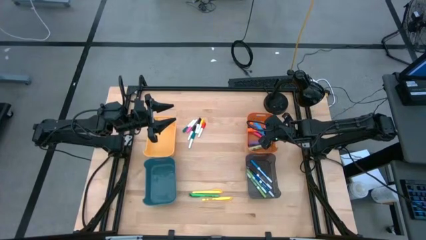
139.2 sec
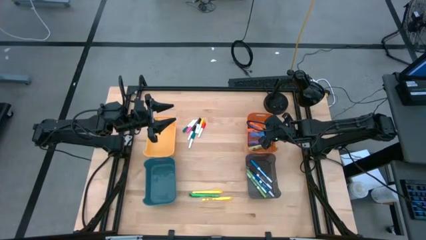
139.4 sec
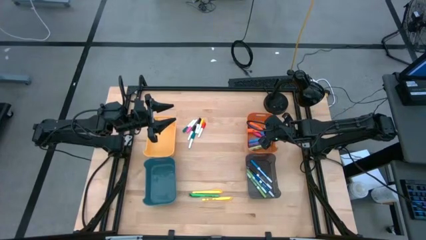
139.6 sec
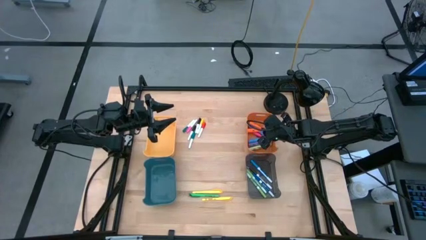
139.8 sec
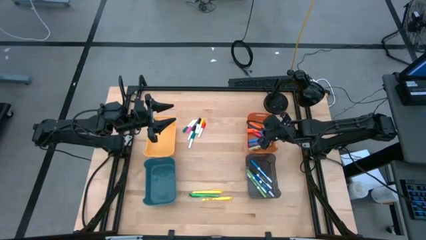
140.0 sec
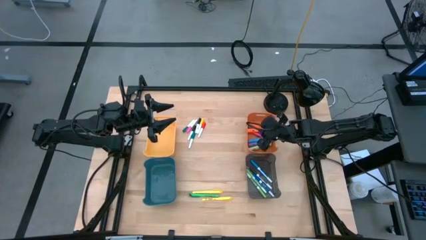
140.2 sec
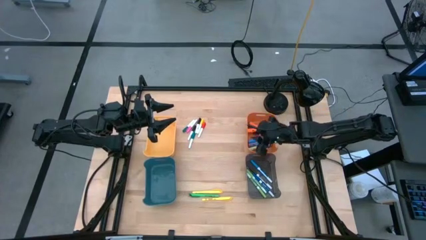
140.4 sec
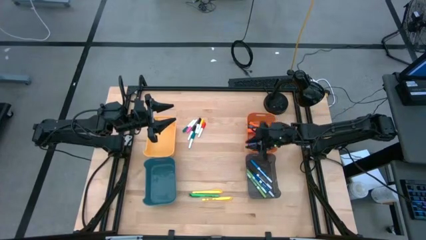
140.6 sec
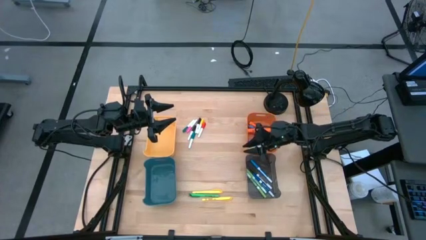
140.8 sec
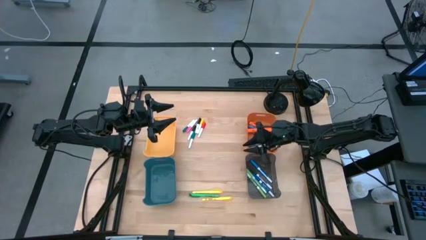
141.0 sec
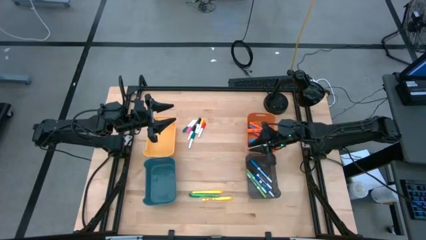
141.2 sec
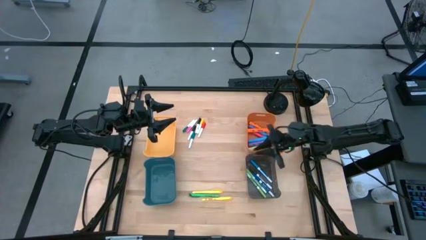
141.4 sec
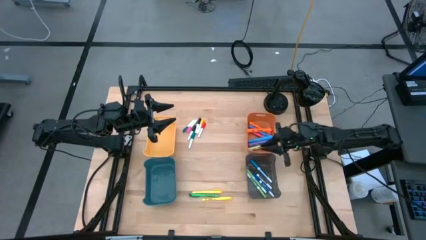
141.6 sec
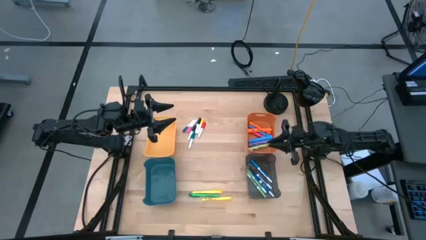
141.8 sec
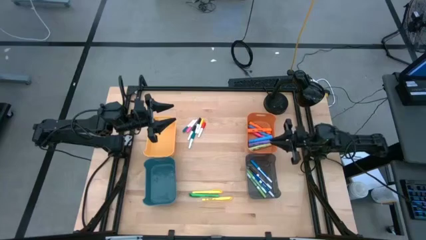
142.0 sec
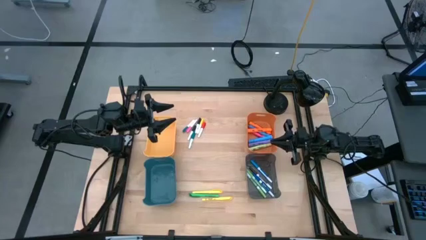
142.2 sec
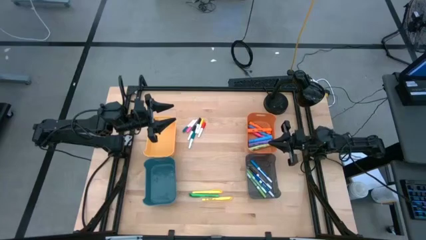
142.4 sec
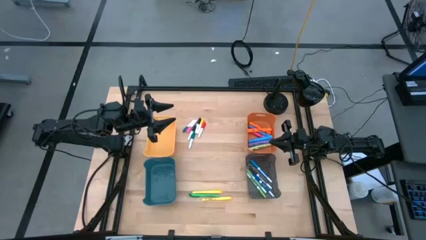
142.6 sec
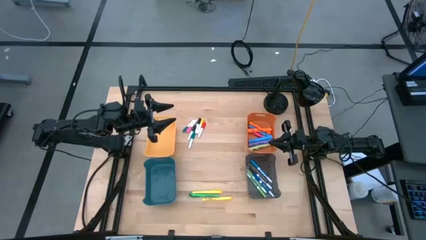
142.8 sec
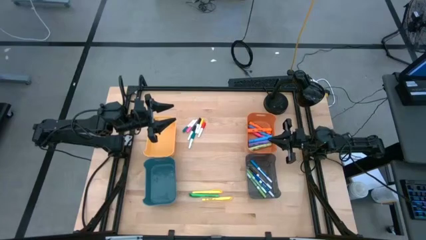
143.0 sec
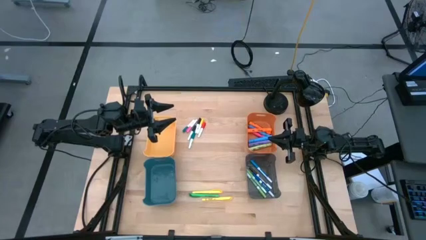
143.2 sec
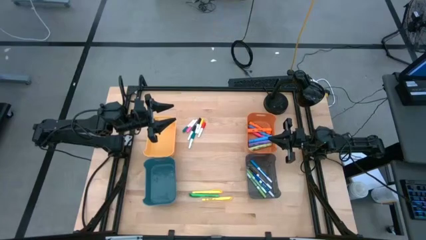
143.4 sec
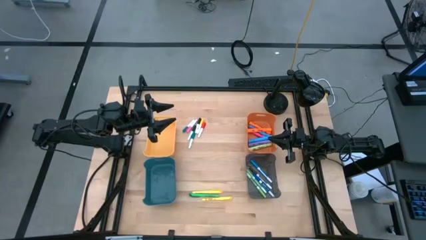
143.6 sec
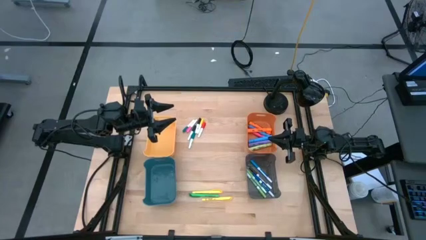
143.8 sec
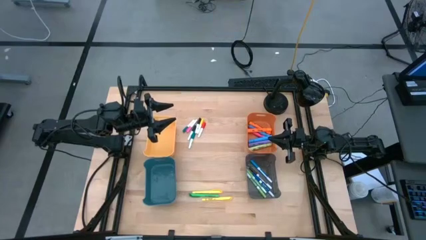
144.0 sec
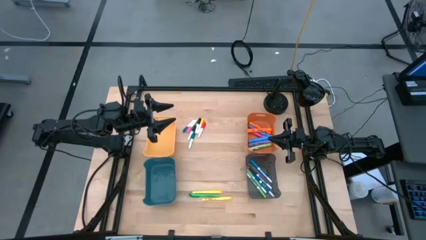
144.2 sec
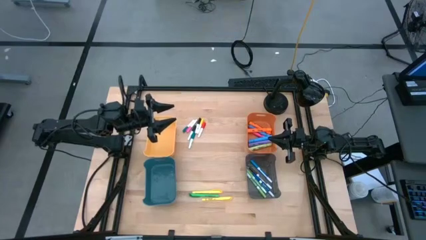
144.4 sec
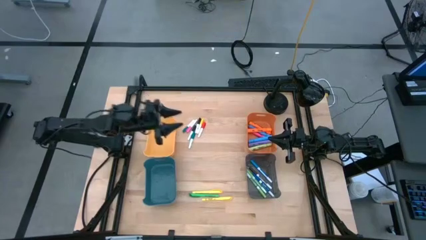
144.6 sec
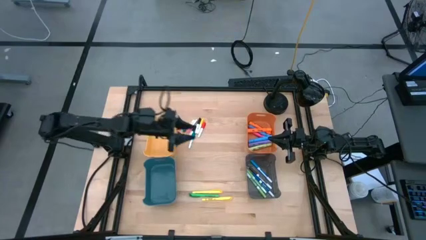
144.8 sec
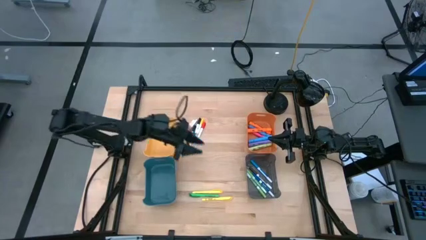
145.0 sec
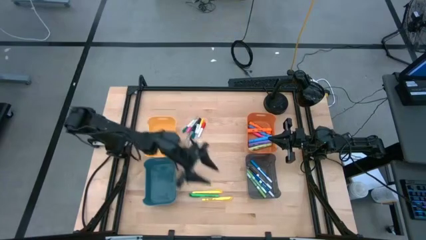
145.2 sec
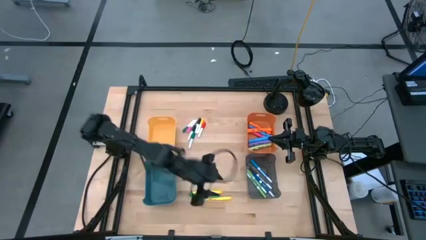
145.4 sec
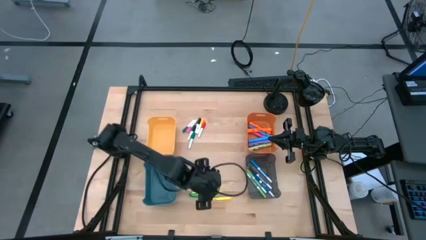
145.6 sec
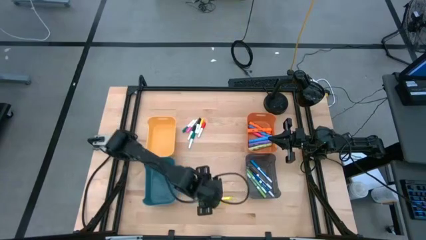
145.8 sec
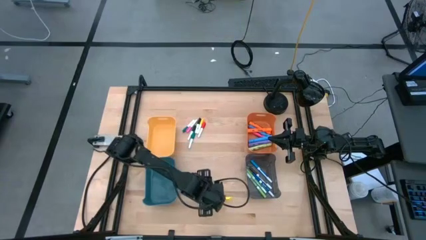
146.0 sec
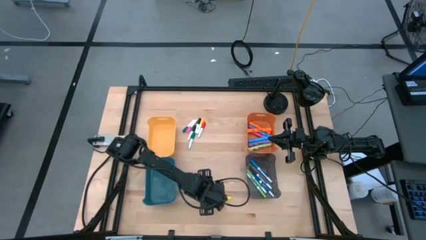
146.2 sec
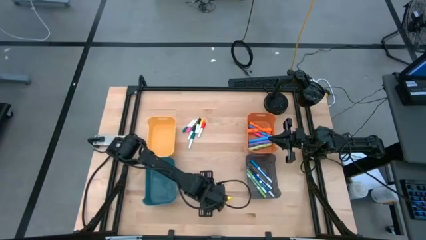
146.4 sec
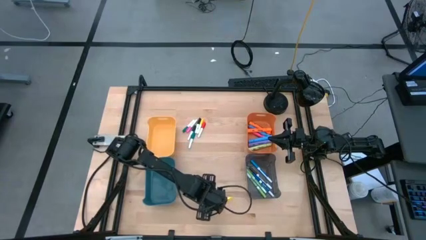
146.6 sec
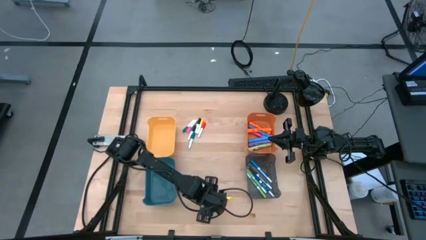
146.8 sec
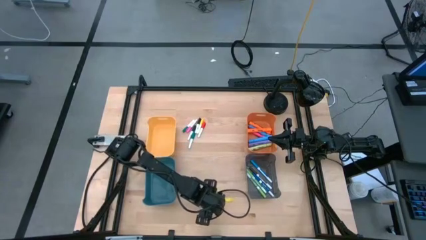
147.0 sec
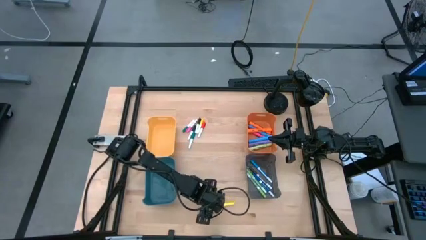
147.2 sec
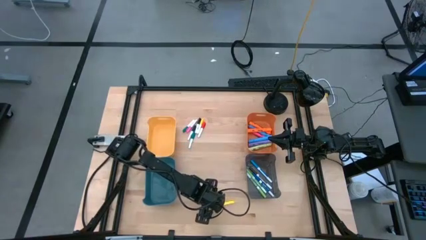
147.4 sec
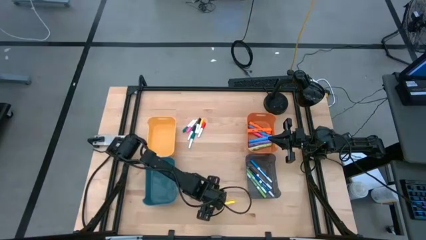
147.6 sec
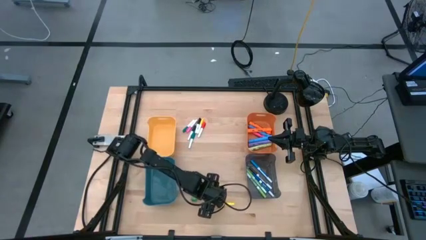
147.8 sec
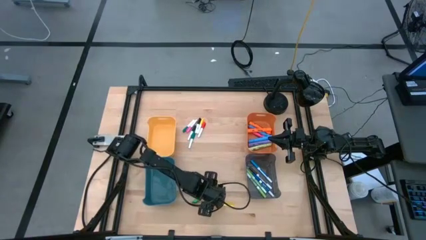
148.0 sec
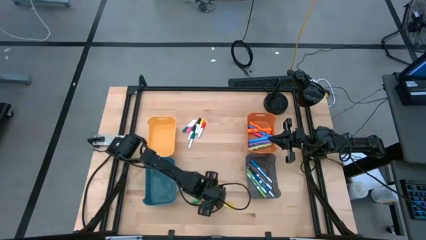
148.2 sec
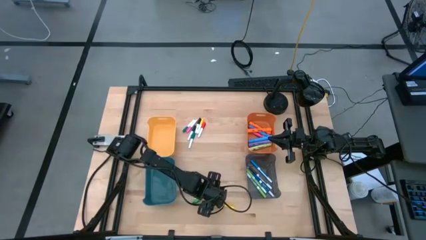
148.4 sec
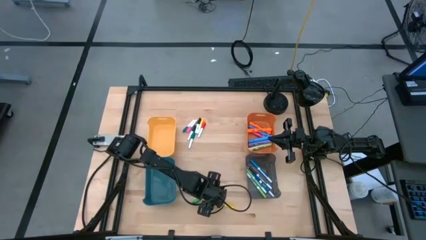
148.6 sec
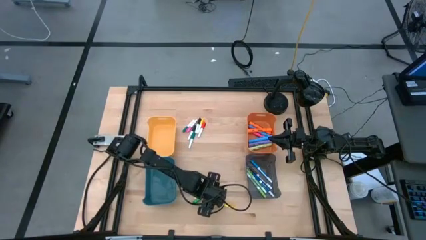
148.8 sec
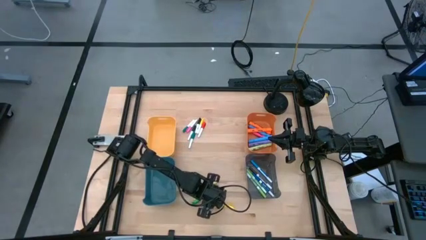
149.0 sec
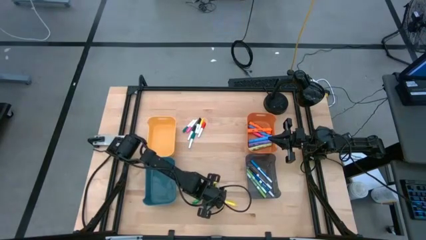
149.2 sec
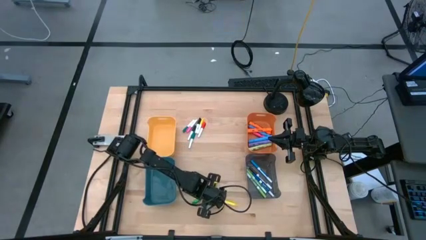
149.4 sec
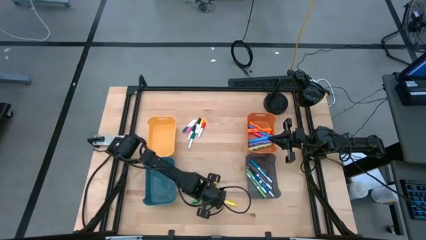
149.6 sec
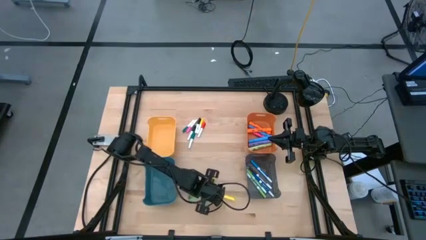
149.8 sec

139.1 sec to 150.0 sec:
Task: Pick & Place Markers
Put the bottom yellow pen into the blue bin

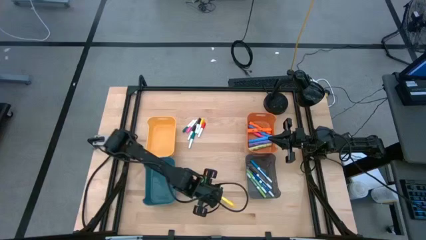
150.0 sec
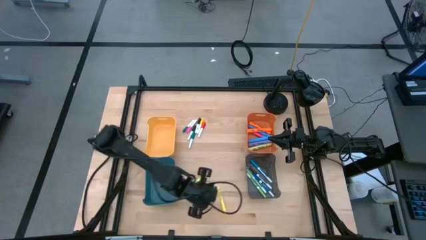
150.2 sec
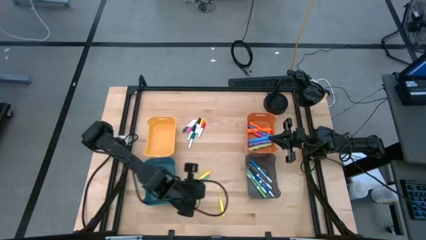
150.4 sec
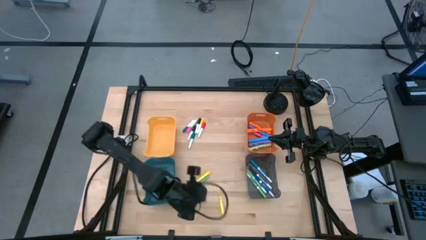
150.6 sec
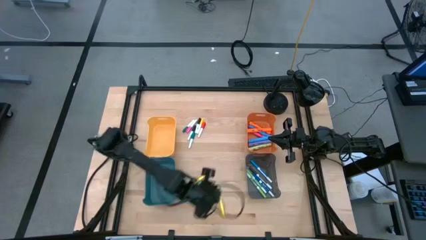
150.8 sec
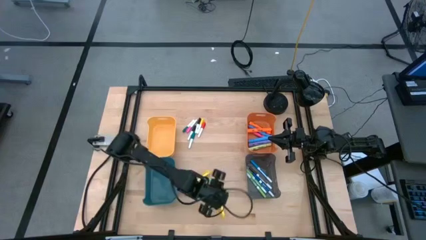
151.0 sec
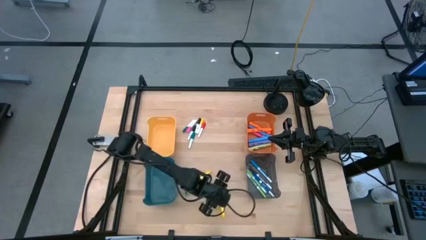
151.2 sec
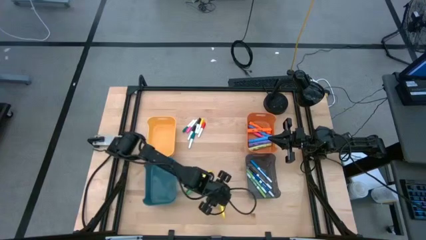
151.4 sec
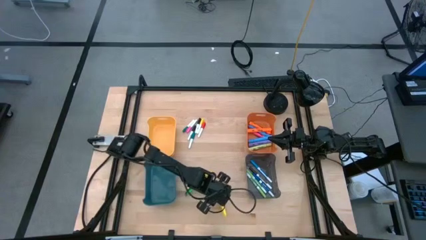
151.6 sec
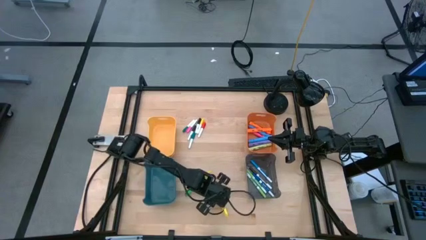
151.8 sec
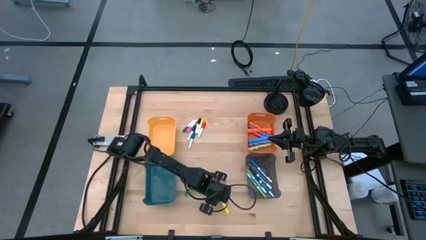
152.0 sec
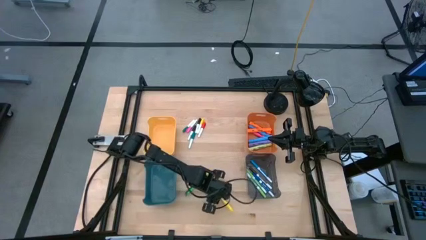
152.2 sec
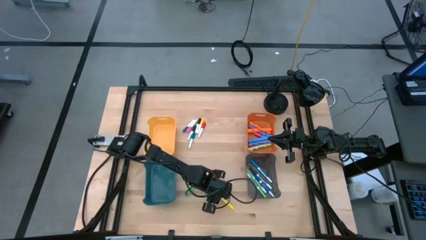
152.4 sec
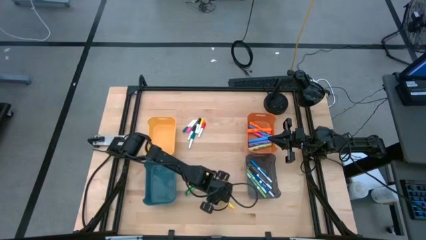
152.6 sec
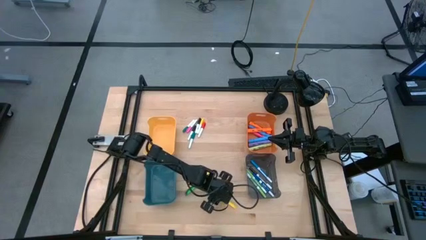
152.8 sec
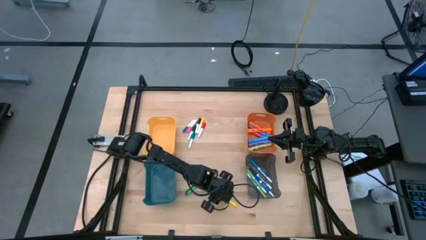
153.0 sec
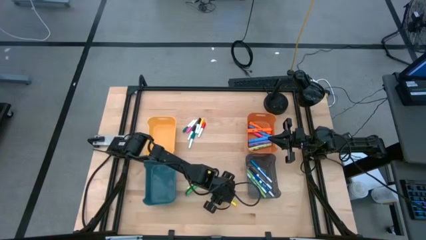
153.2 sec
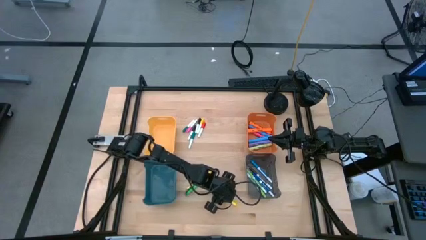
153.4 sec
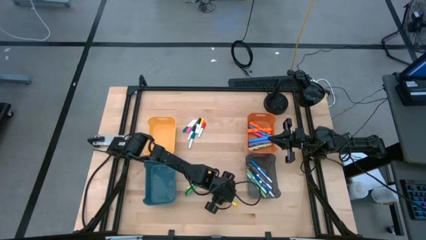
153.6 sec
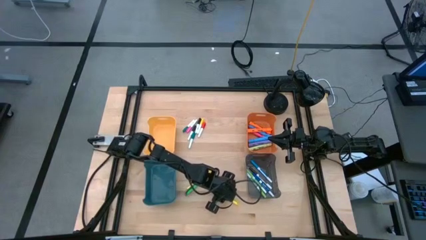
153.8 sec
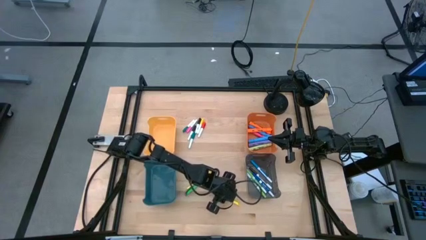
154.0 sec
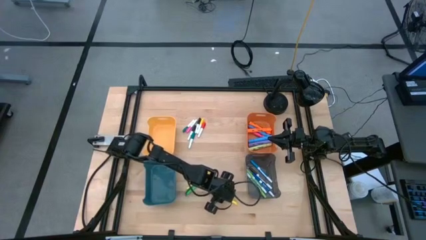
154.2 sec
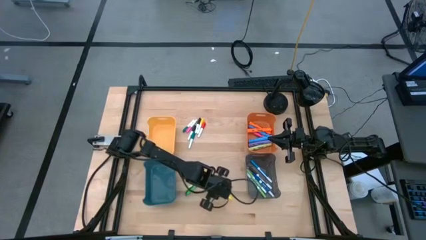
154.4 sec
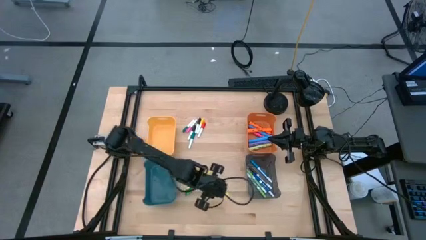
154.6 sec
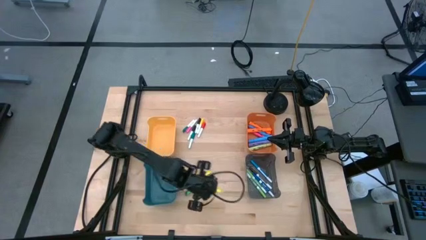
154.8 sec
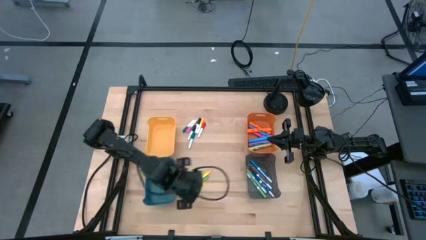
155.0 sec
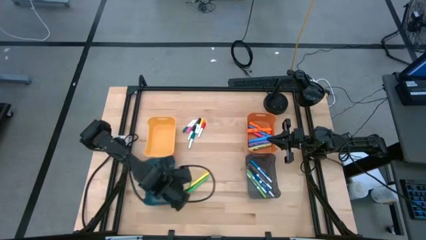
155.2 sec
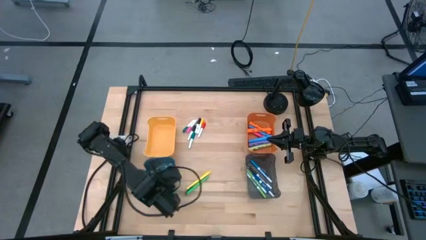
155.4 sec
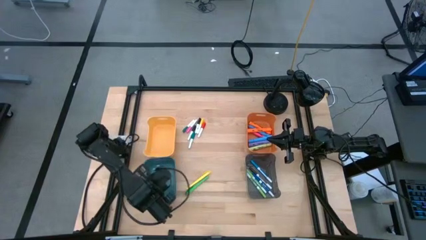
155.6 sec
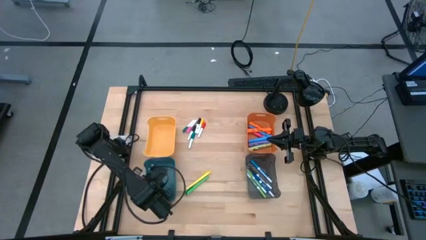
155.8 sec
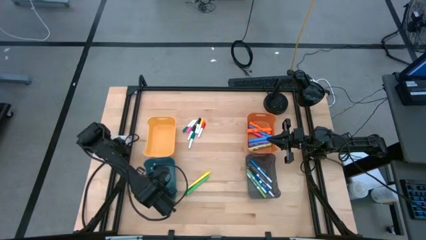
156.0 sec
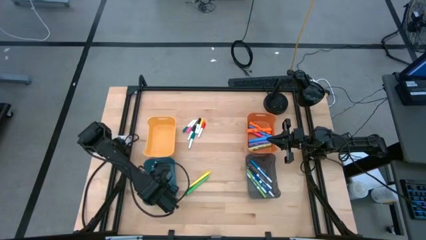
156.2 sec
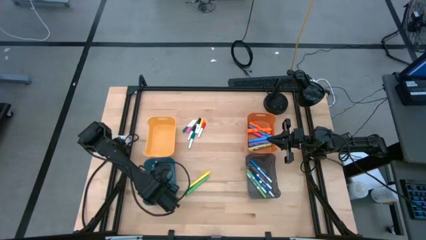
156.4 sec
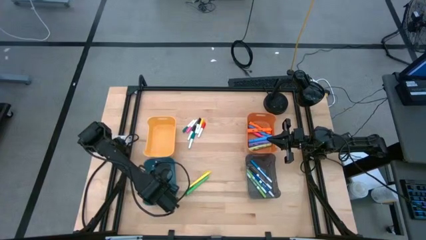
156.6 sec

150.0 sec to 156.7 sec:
Put the bottom yellow pen into the blue bin

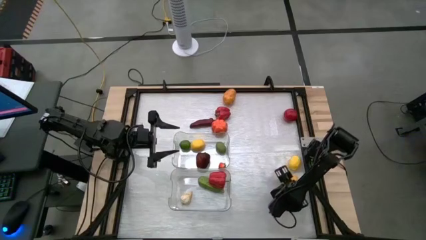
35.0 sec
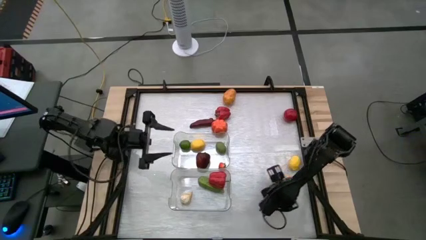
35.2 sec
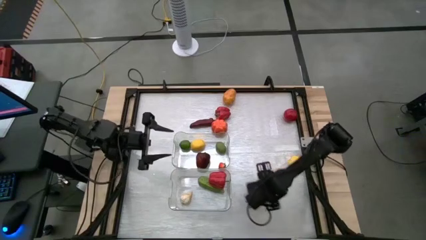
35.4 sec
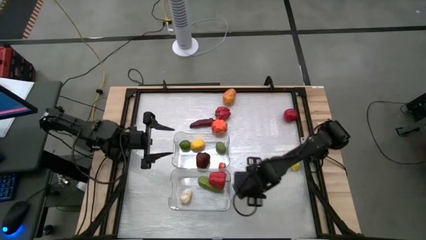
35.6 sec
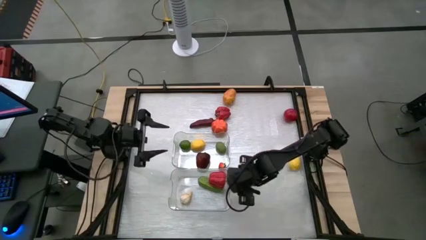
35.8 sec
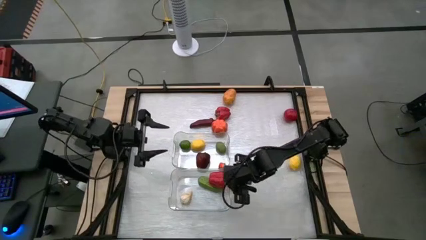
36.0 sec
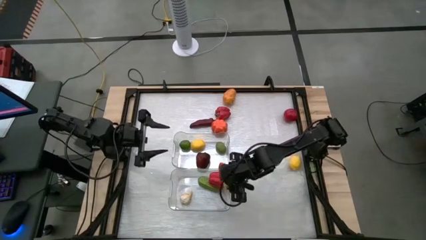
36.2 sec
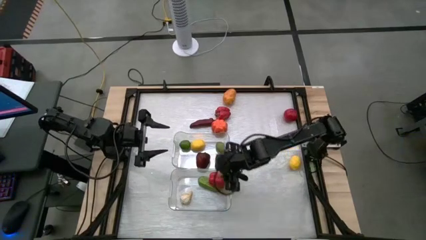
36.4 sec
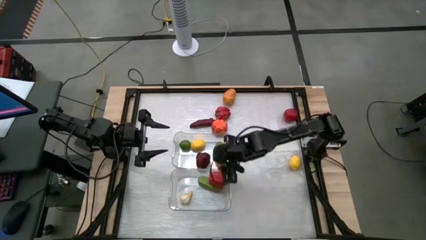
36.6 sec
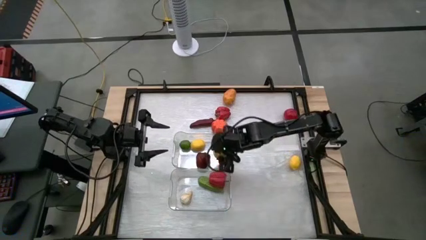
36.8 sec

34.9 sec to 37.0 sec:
Task: Sort produce into baskets
Put the lemon into the top transparent bin
